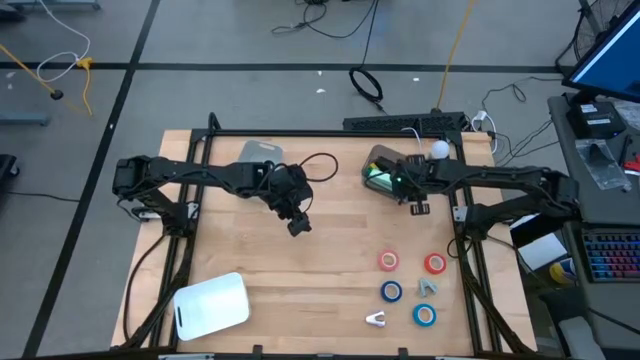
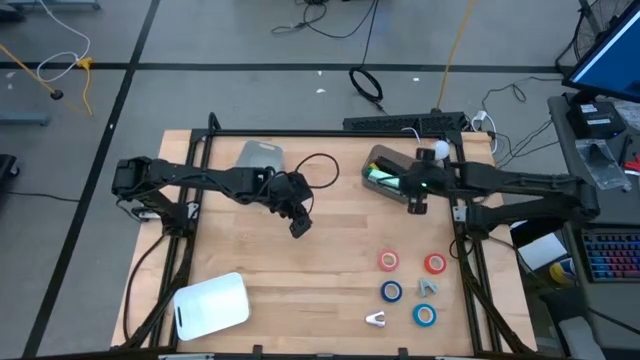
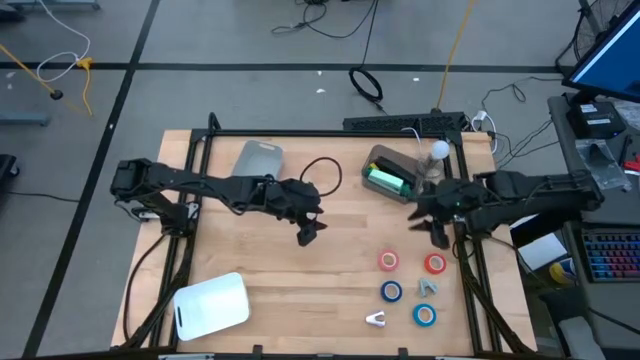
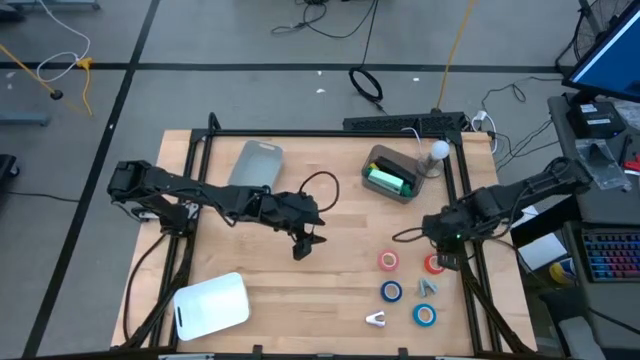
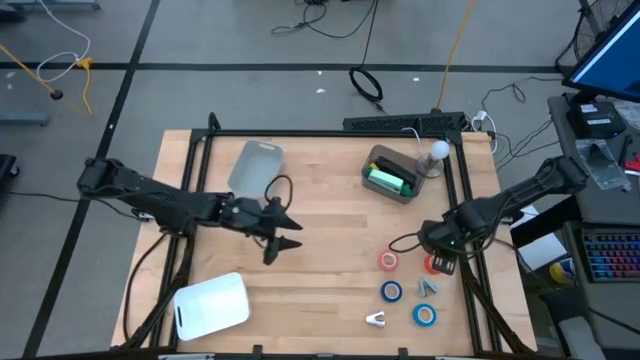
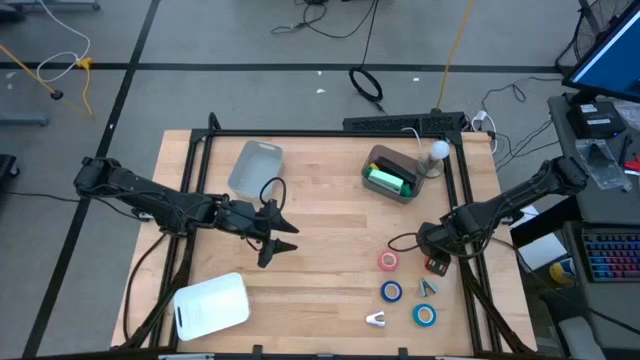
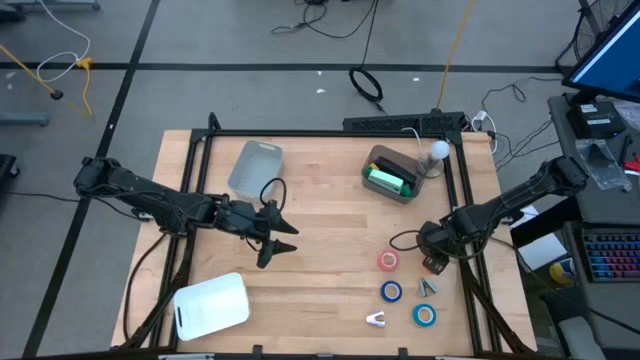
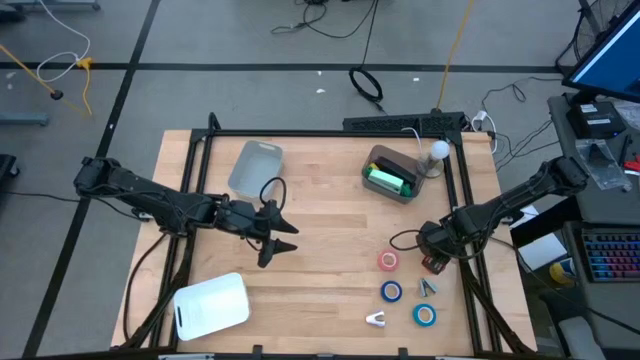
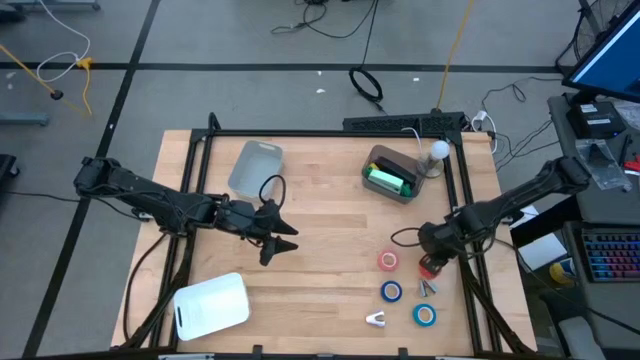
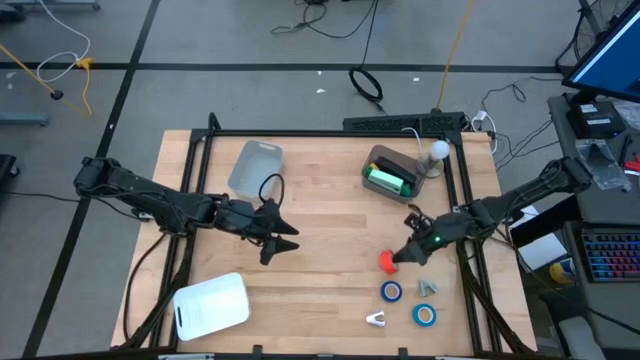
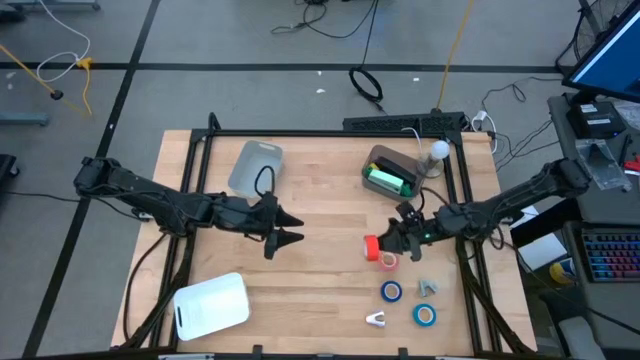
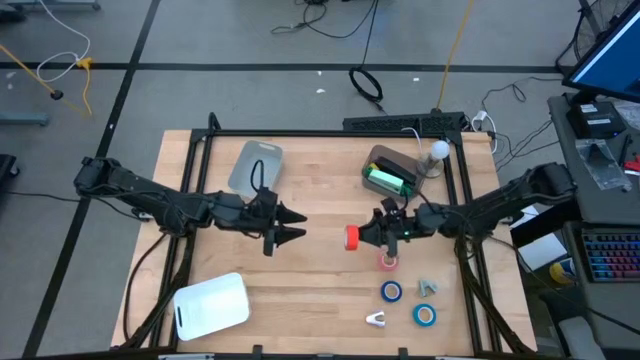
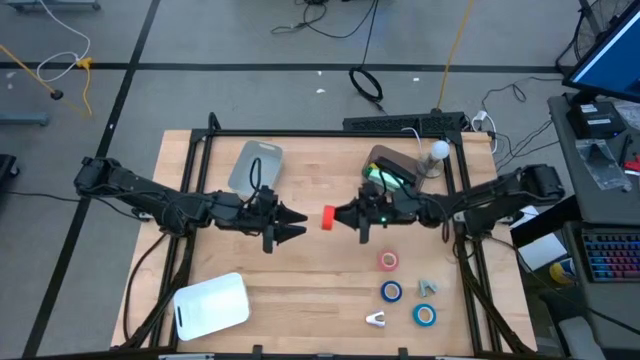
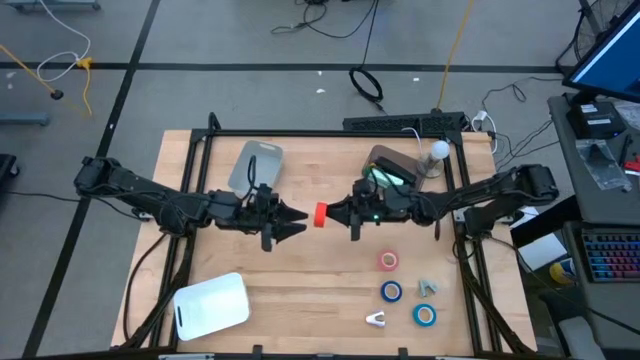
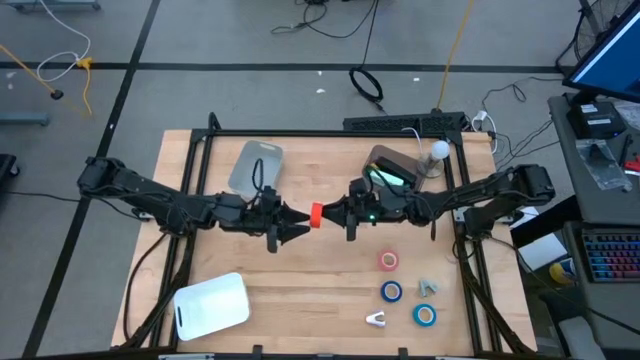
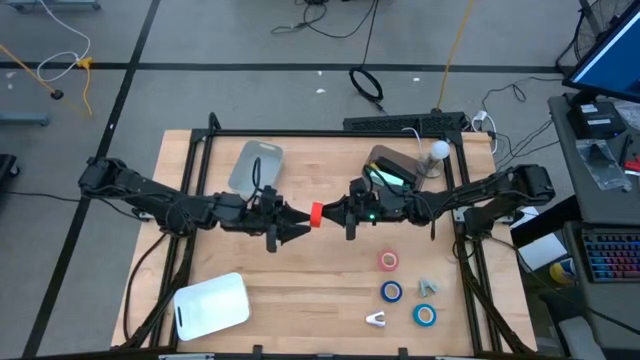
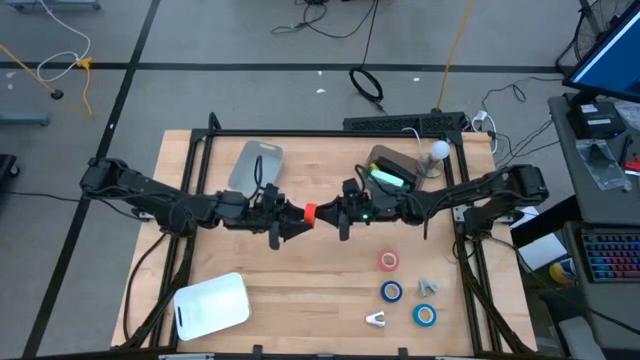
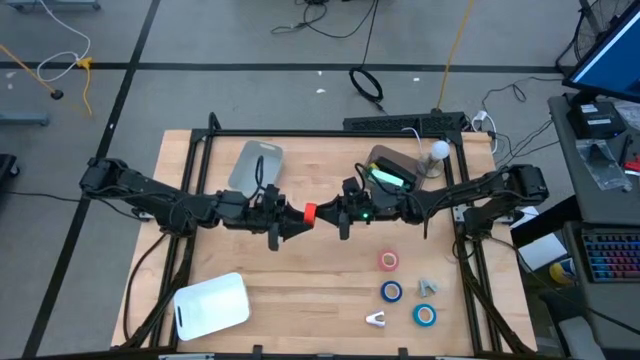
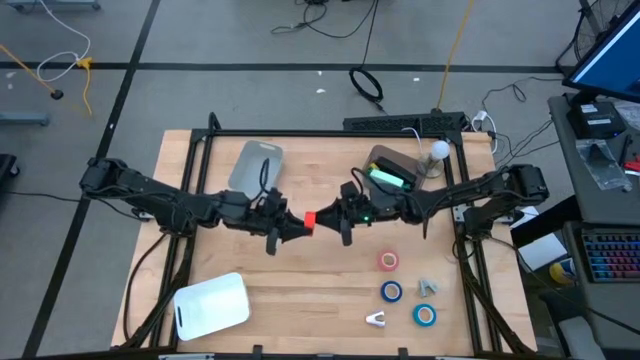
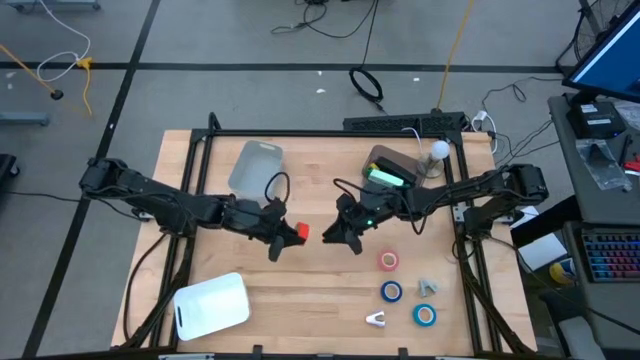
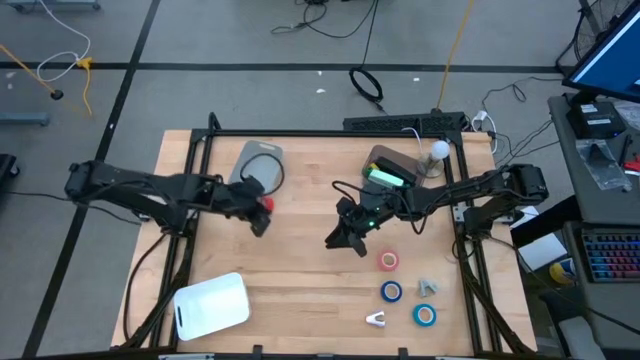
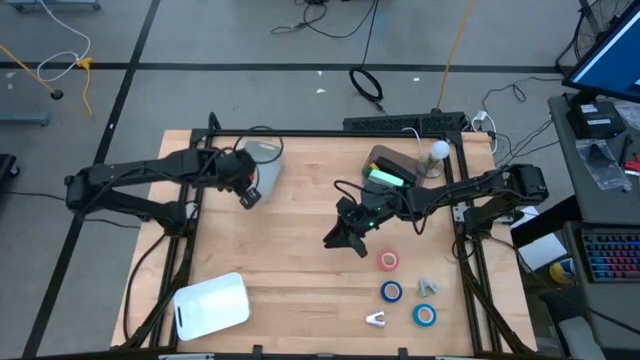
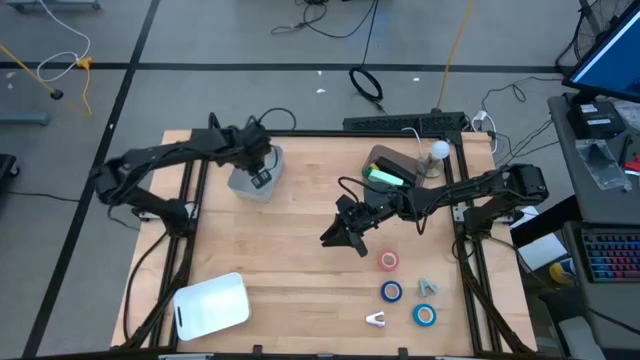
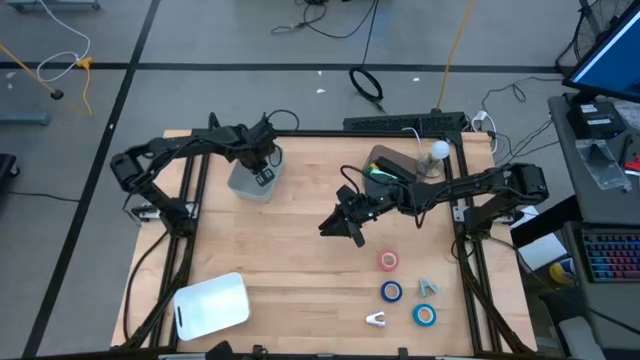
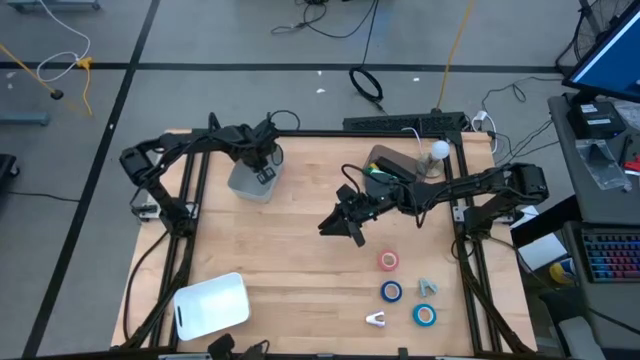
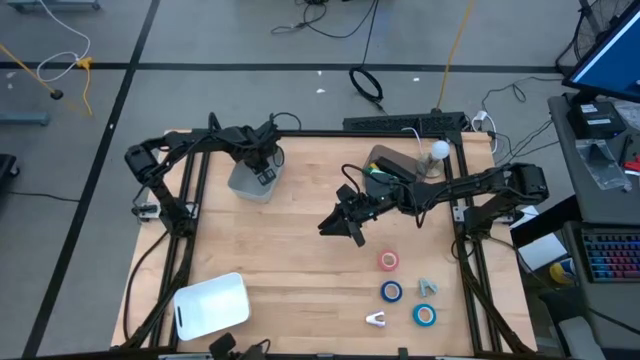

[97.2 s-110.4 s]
Task: Pick and place Stapler, Stapler remover, tape
Put the orange tape into the gray bin

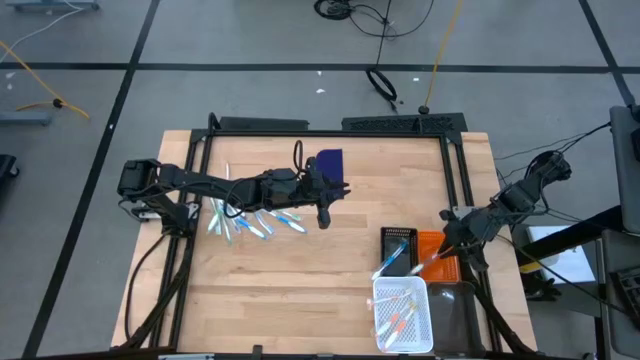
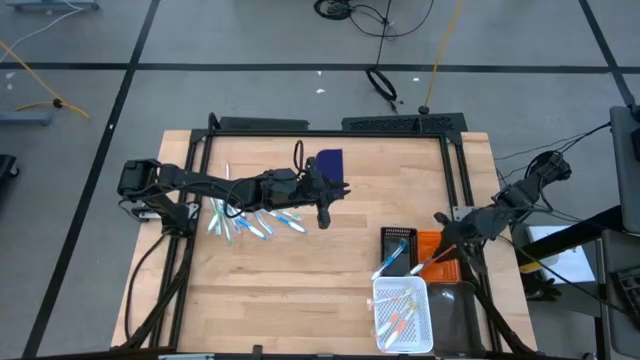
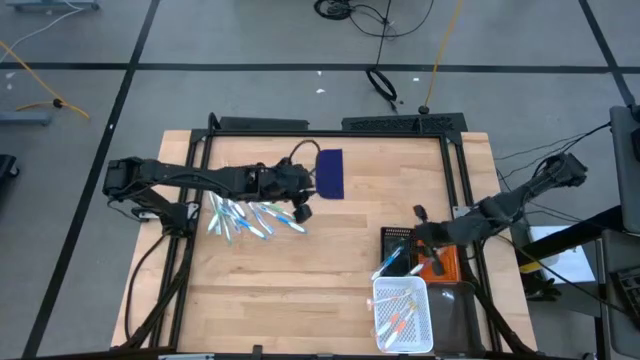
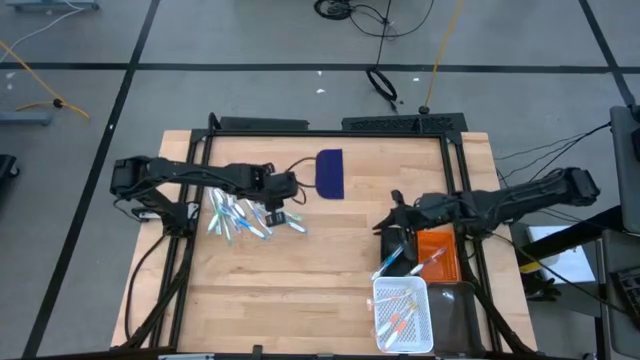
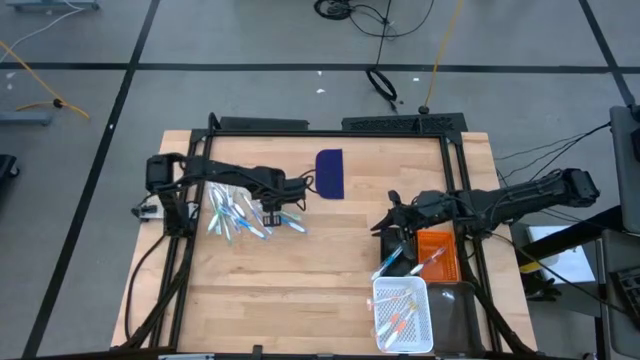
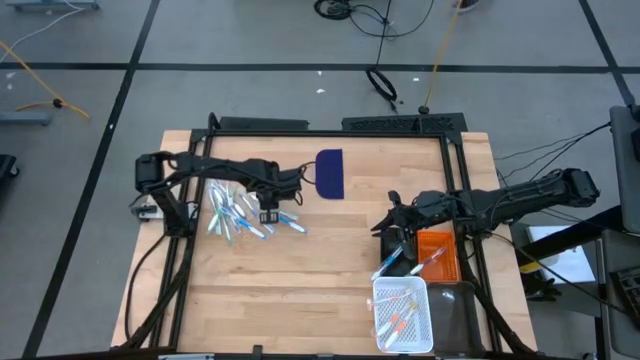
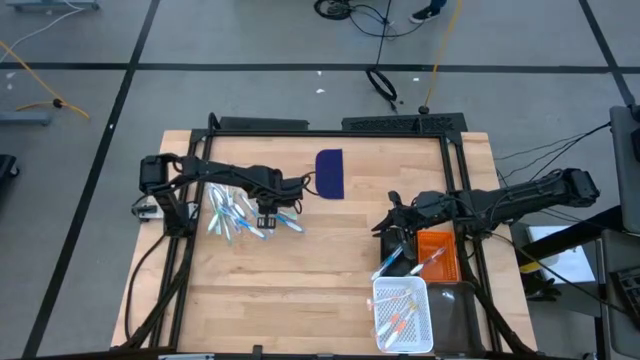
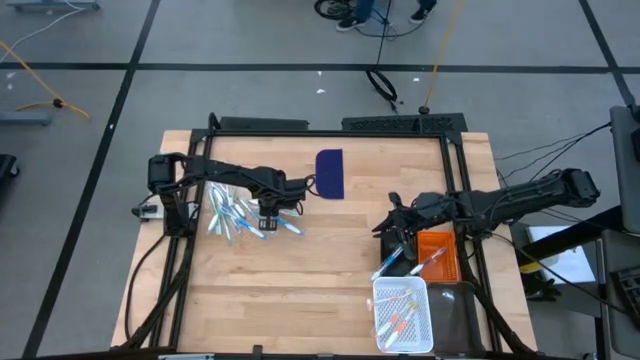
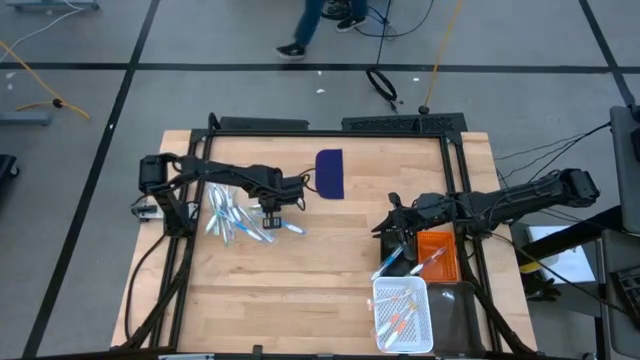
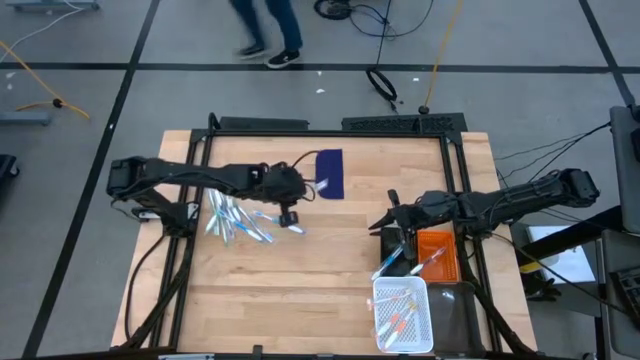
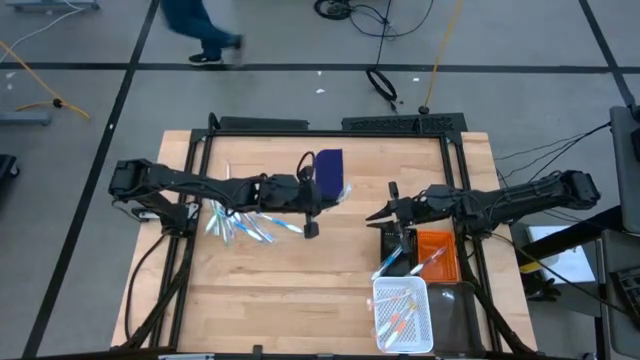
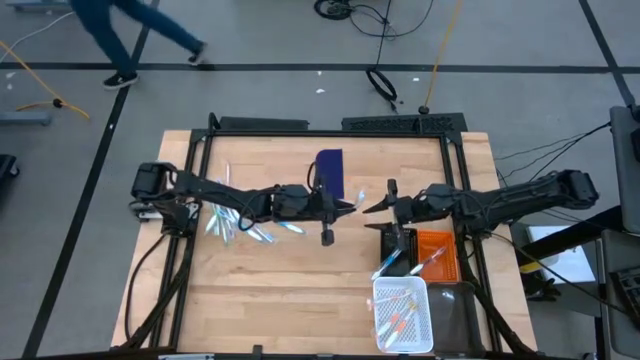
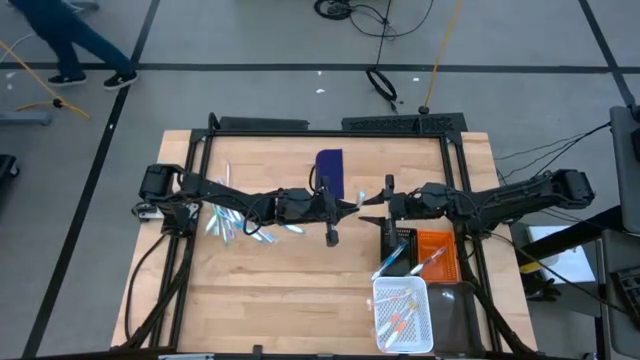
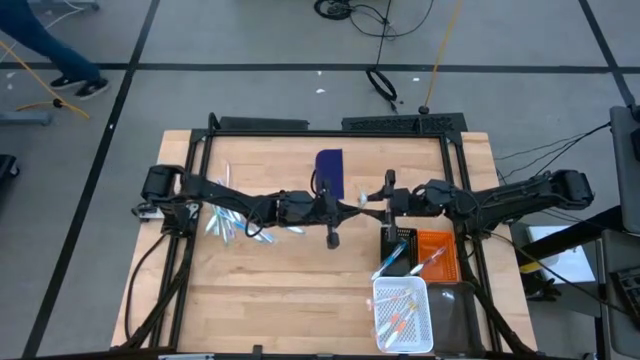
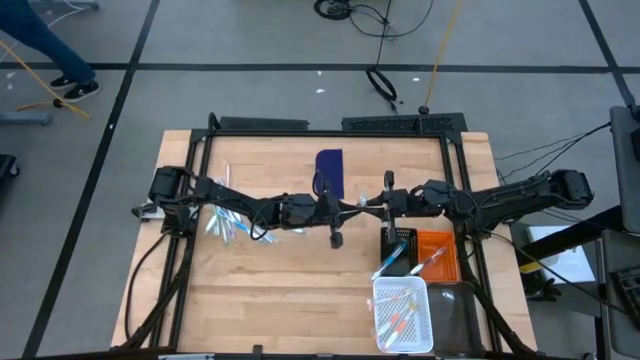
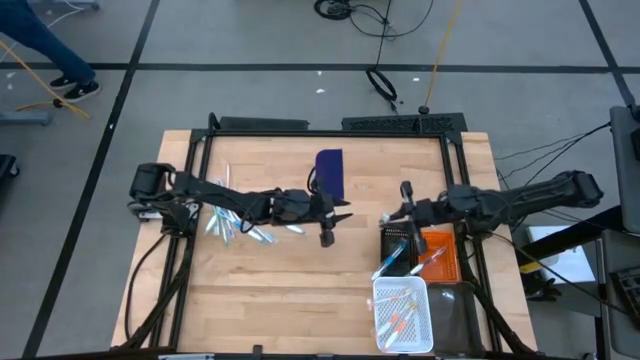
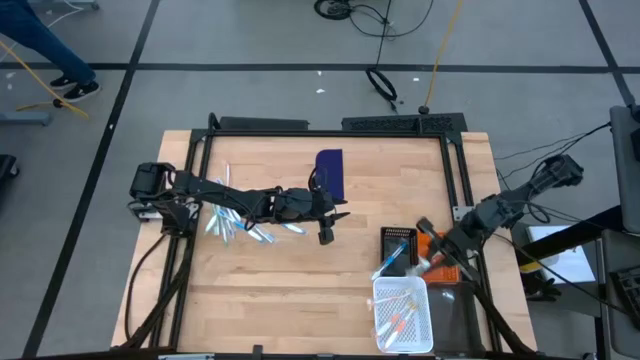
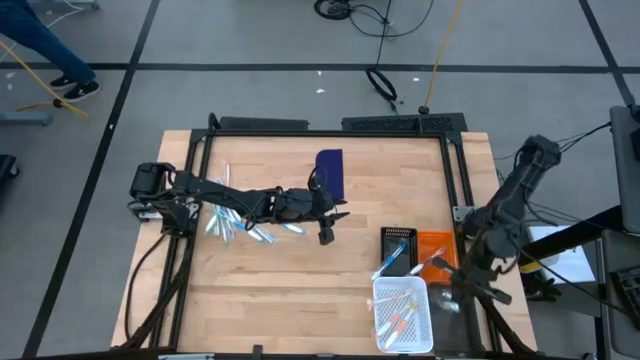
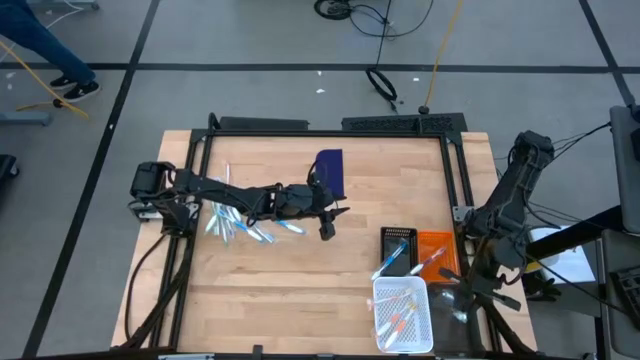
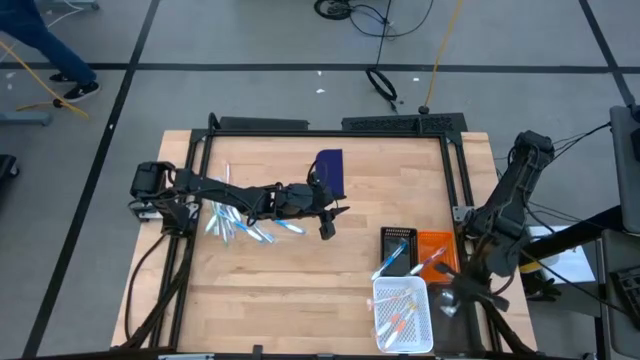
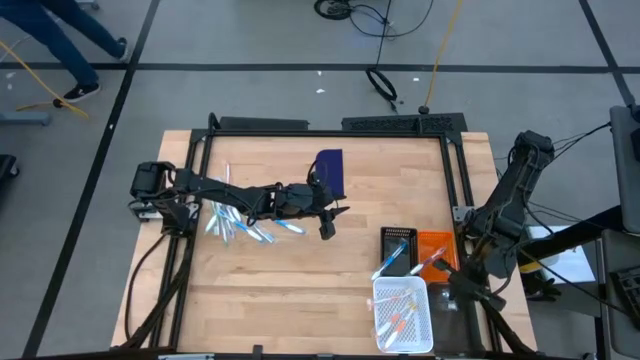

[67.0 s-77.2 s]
Task: Pick & Place Toothbrushes
Put the green toothbrush into the black bin
